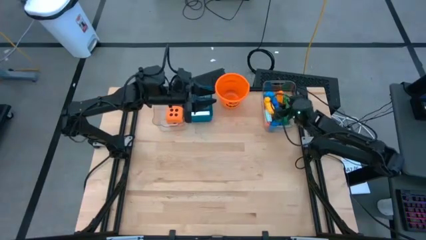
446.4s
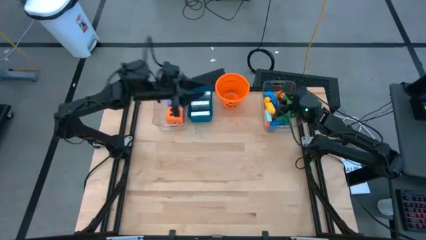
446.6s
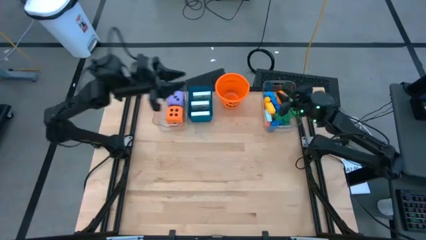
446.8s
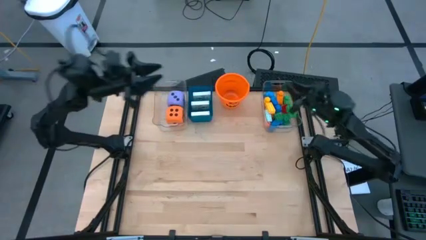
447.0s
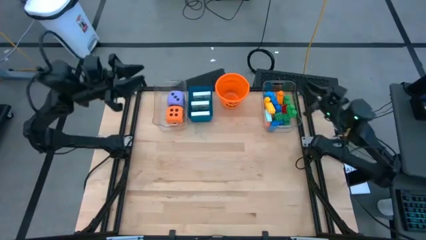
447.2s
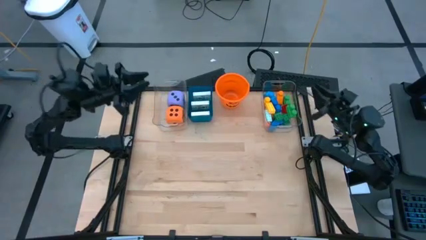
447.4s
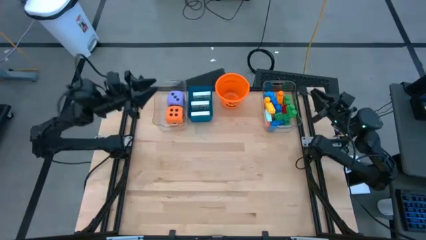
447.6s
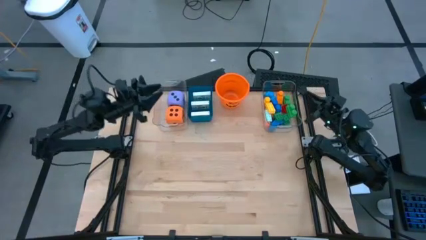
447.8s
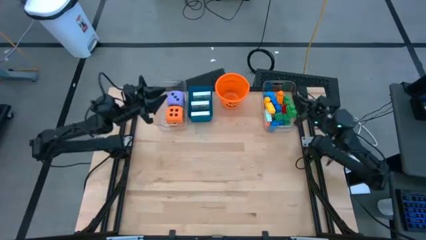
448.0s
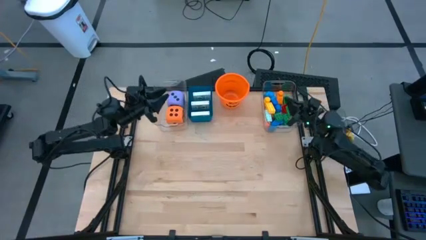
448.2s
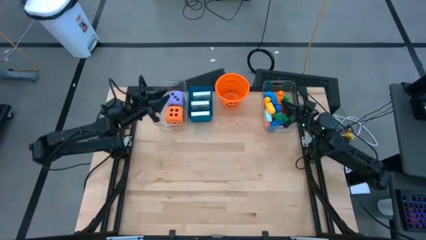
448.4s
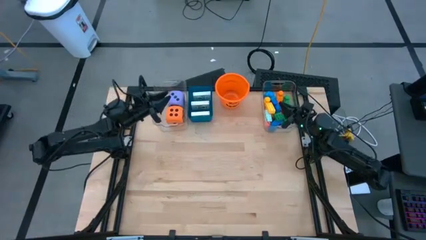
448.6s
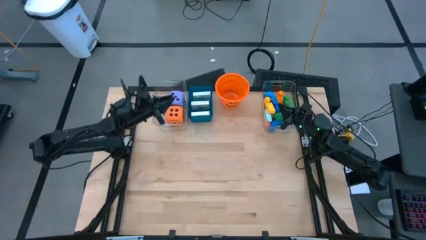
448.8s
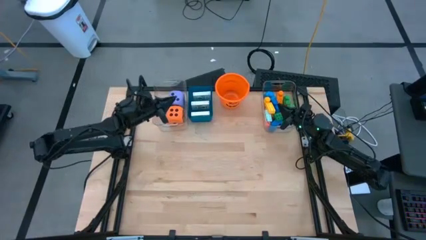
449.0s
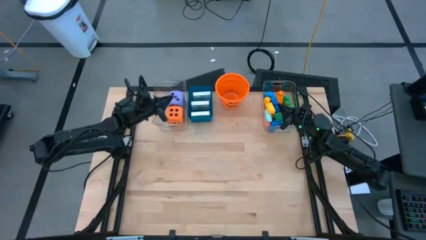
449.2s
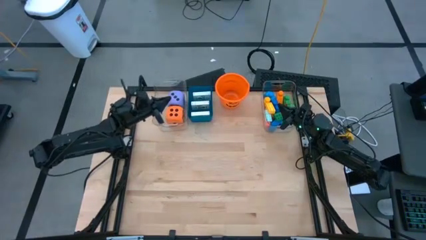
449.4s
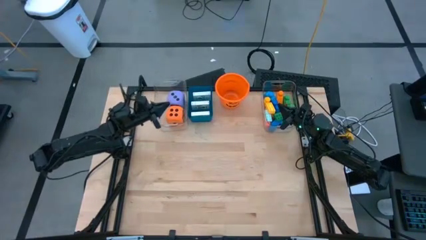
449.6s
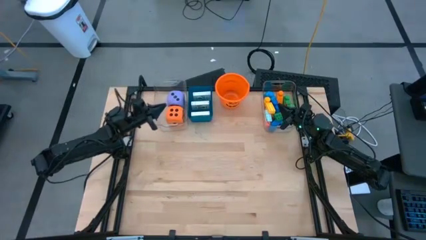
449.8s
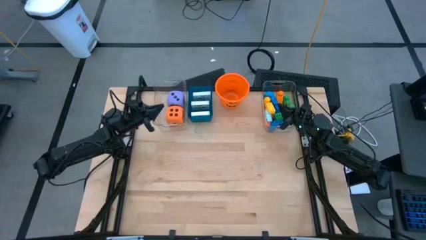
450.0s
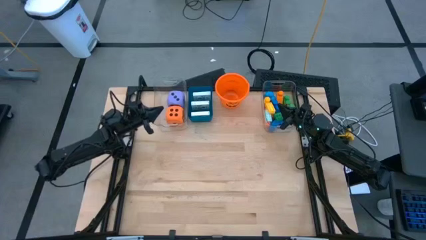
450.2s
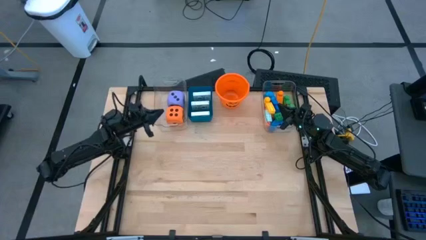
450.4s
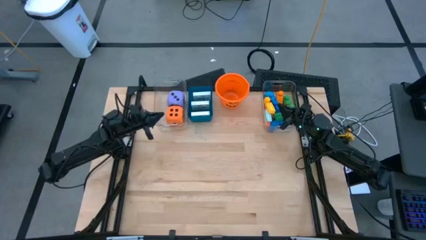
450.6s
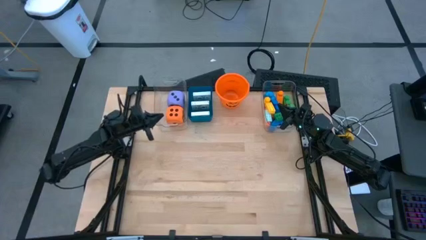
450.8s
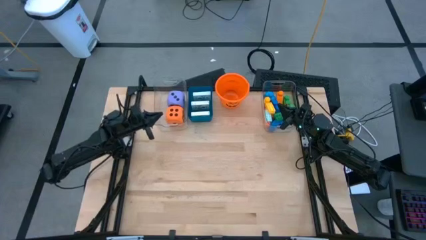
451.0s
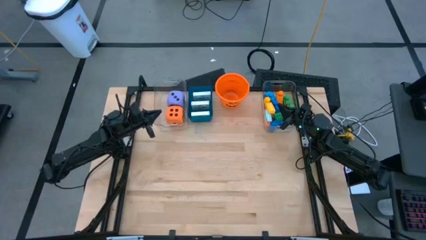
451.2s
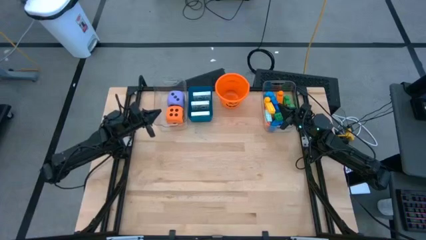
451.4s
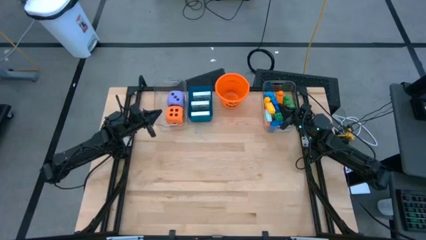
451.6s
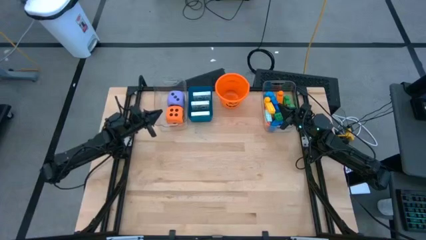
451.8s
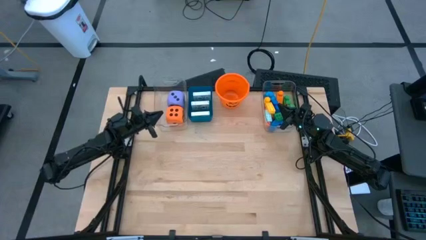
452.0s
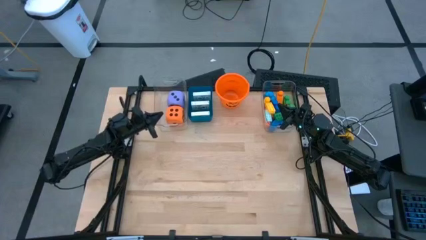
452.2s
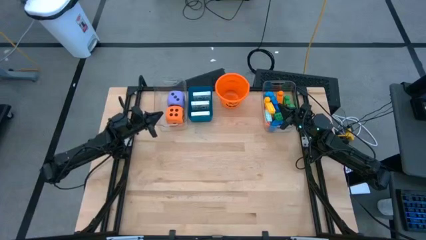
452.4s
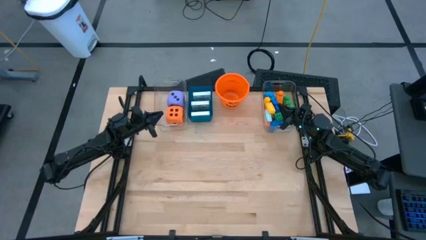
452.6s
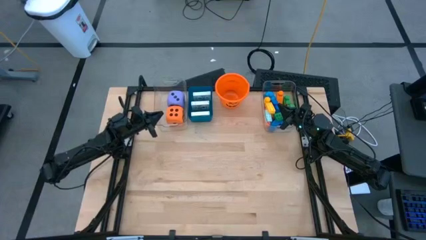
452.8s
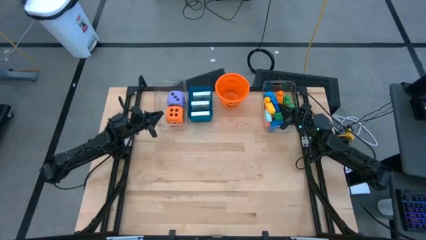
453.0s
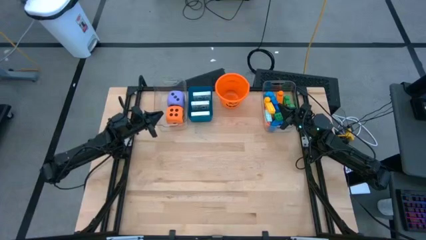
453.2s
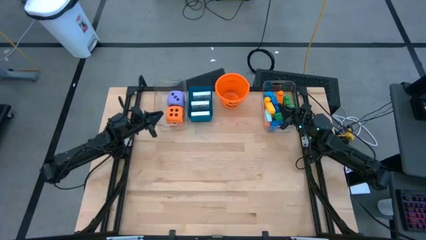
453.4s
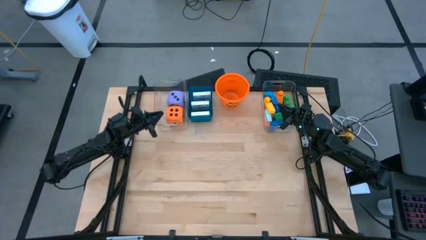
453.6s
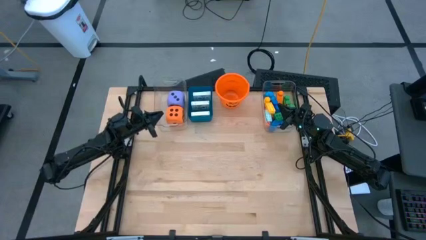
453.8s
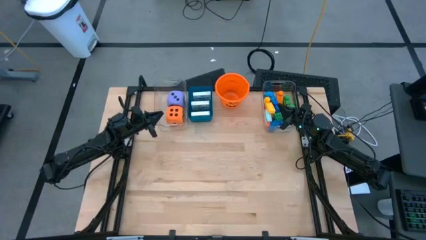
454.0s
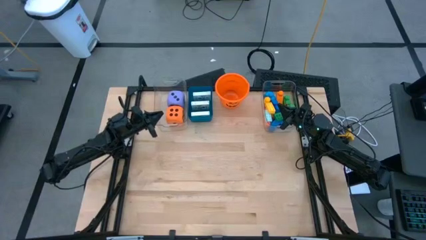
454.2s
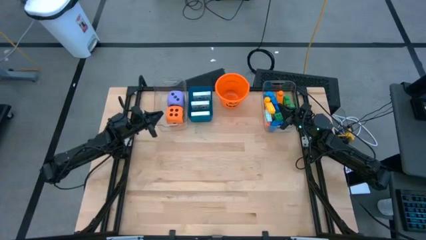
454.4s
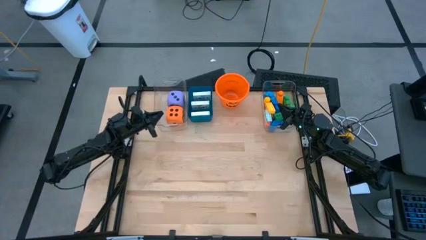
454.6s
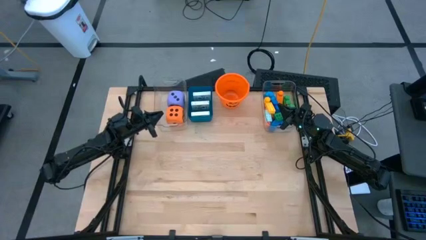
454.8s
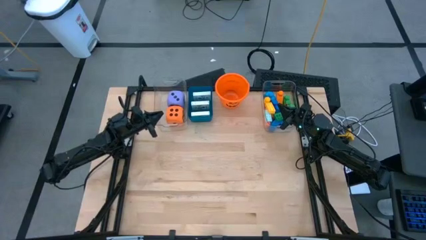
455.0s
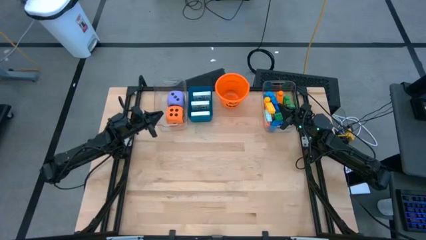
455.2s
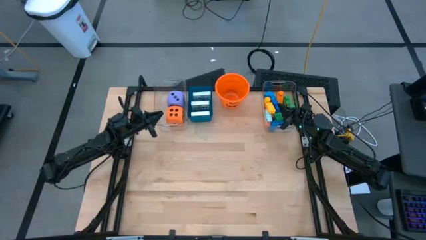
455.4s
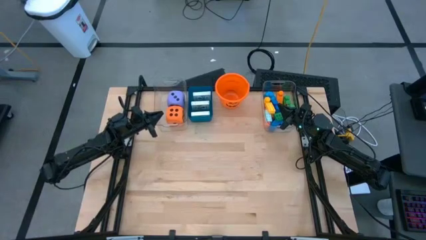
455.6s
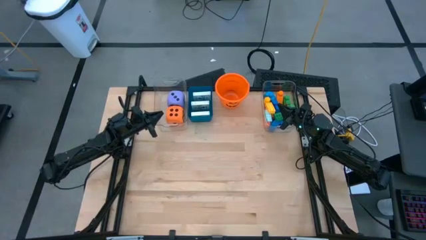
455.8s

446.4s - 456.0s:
Task: Pick & Place Toys
Return to Home Position

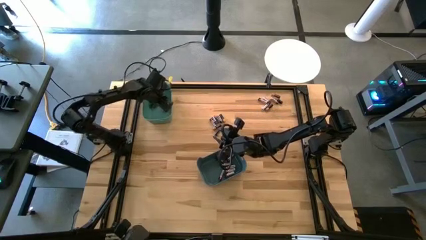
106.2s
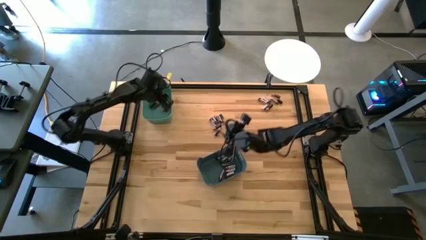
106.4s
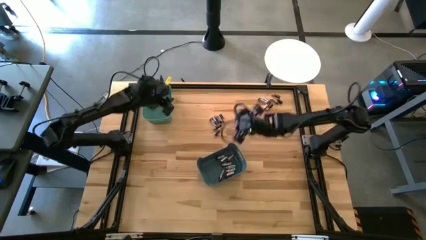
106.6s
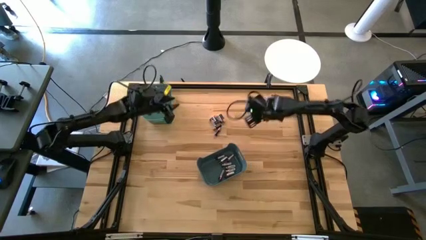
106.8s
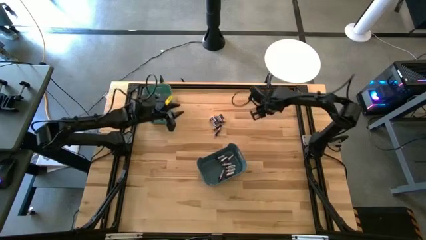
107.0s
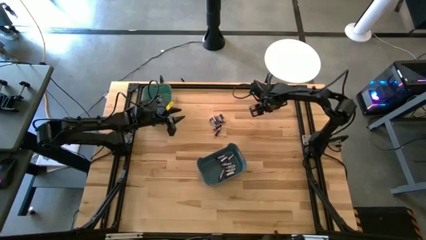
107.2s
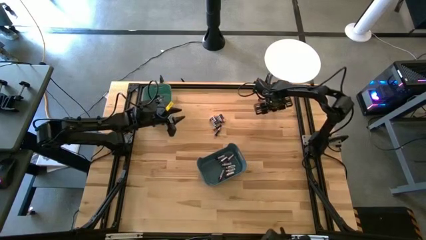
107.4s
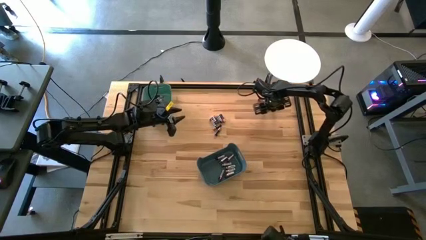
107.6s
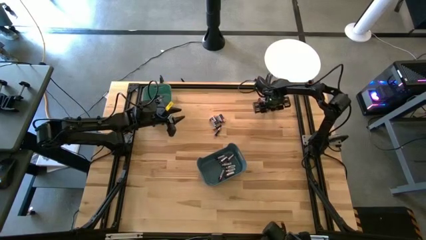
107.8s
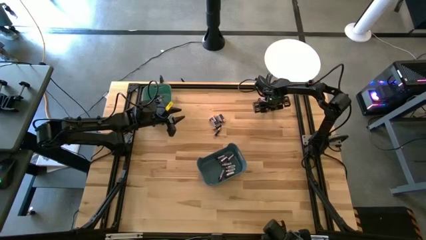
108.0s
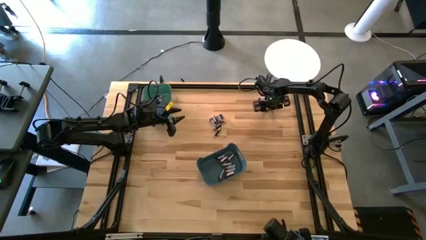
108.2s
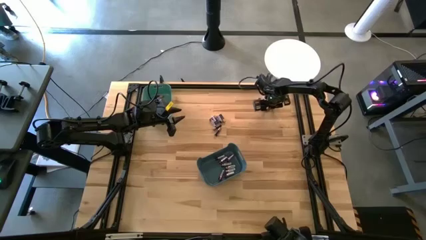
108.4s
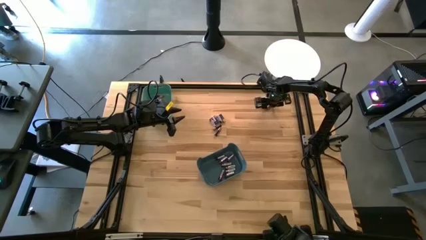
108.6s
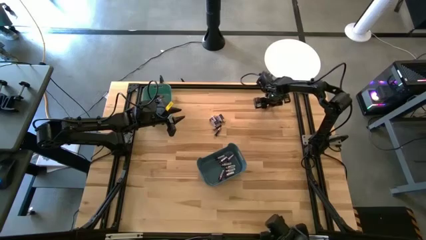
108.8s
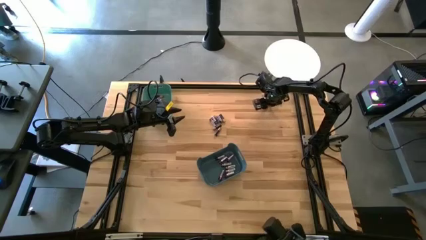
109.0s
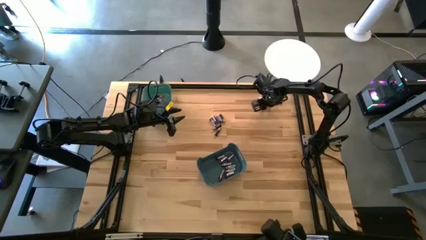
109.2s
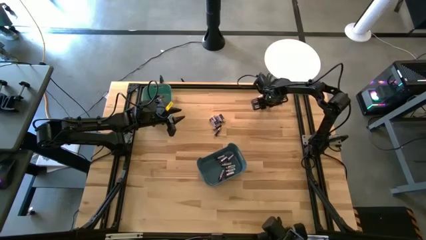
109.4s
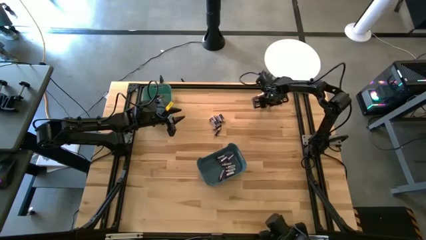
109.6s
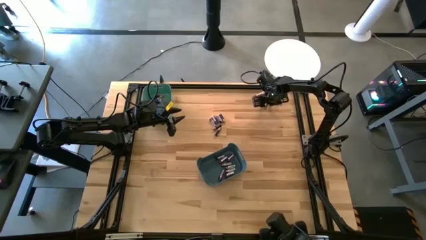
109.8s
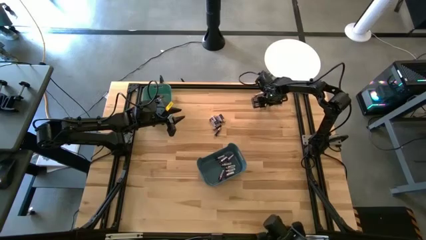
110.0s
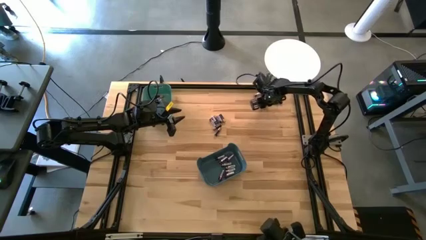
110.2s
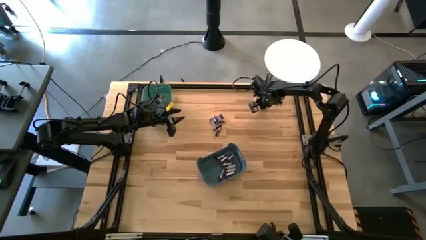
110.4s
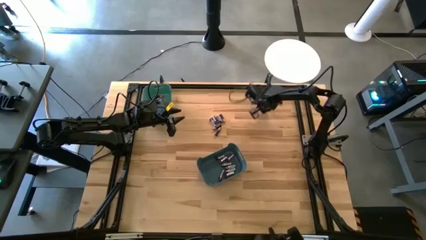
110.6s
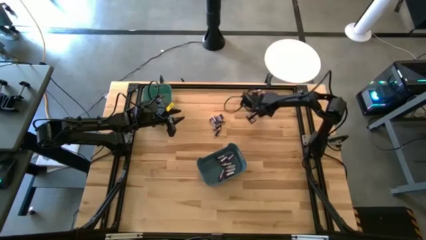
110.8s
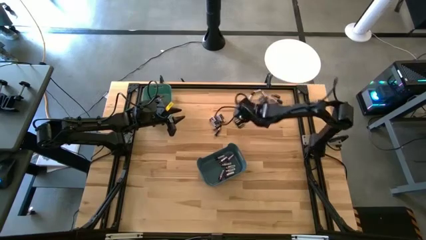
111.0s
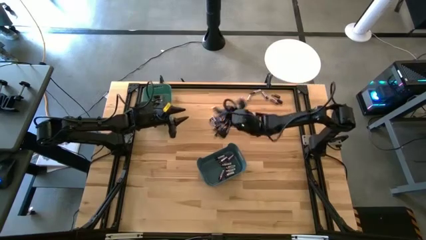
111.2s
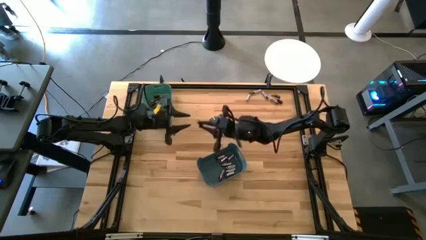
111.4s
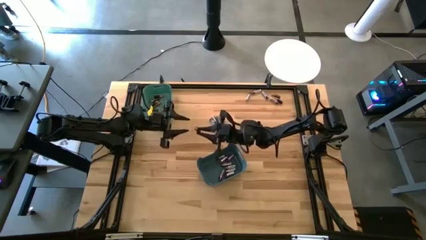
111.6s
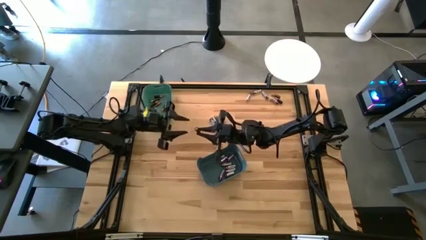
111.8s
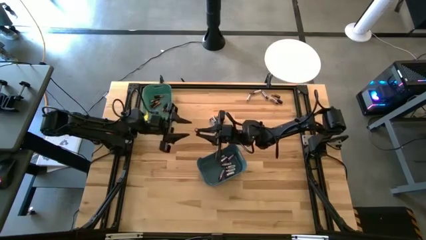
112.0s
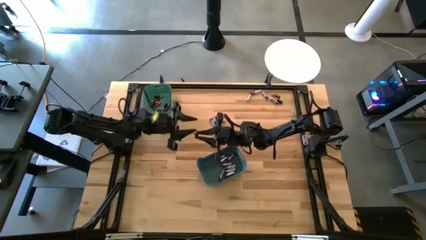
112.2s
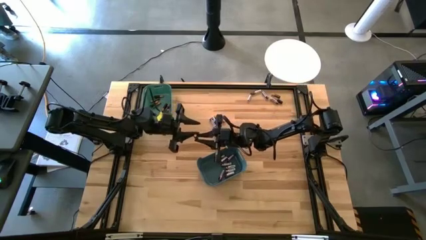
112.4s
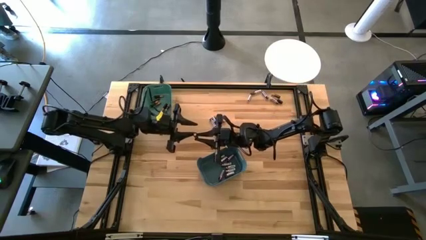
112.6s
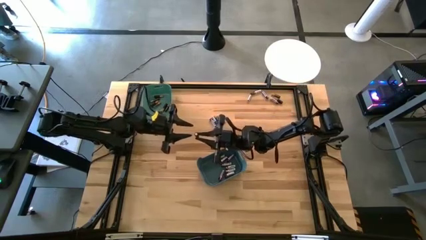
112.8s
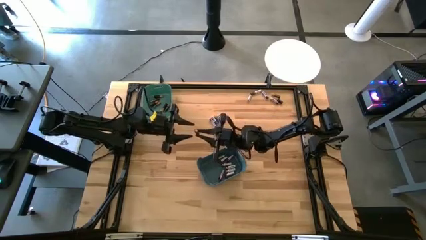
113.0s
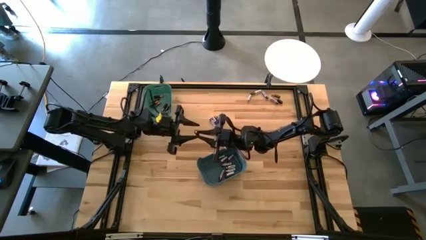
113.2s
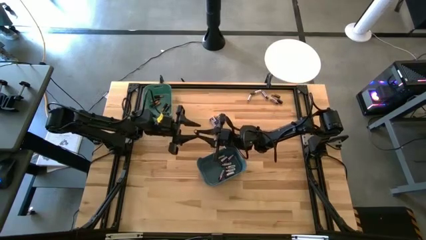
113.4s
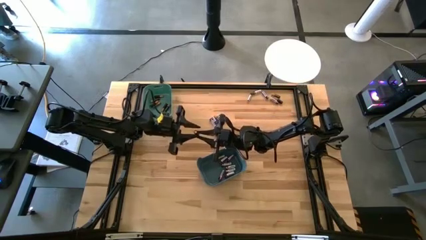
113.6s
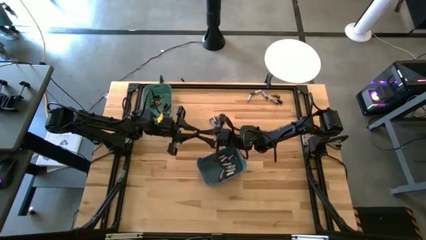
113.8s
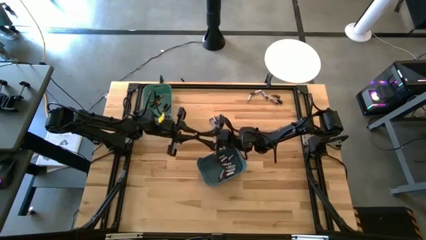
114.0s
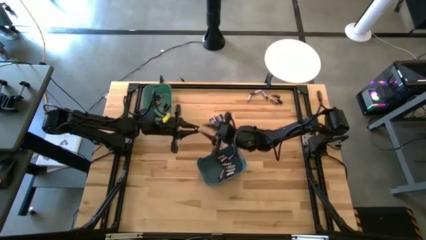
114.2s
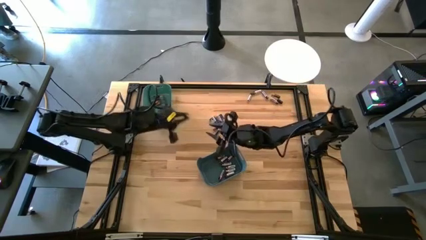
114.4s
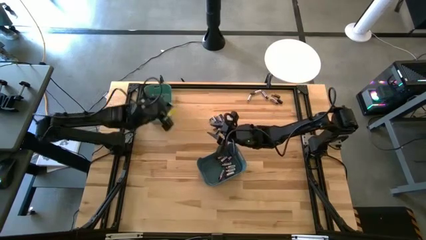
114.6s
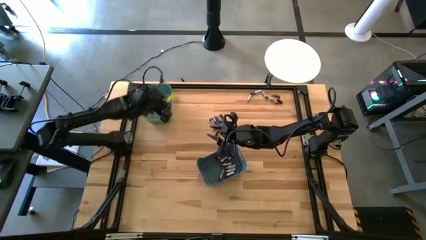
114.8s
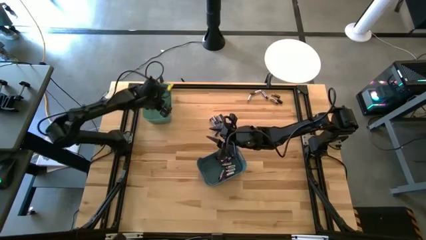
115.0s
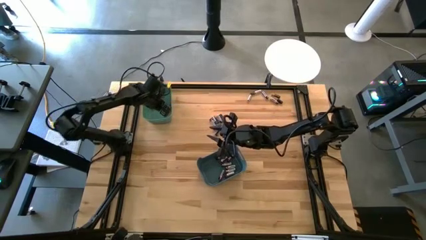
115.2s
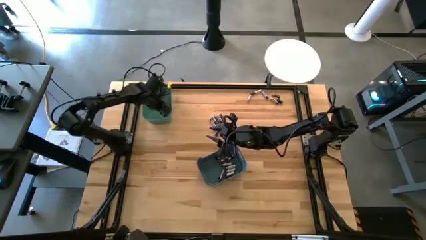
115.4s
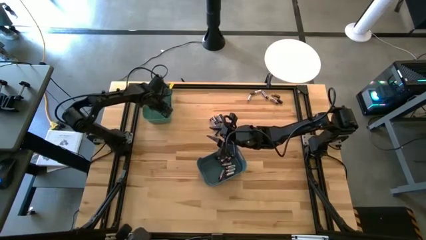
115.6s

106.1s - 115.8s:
Task: Sort batteries
Put the black battery into the green bin
